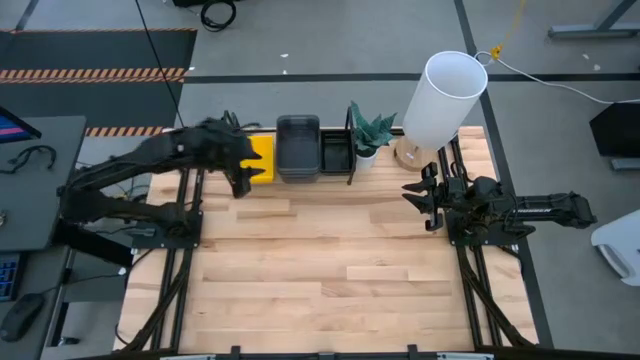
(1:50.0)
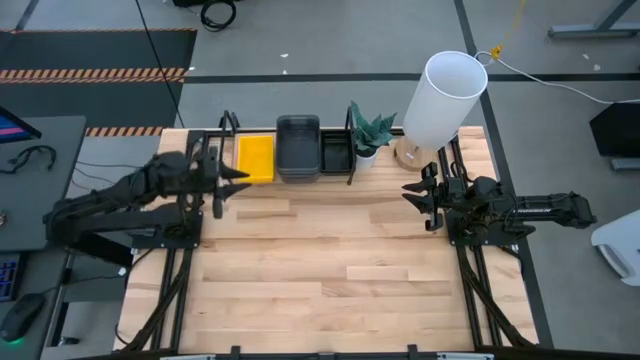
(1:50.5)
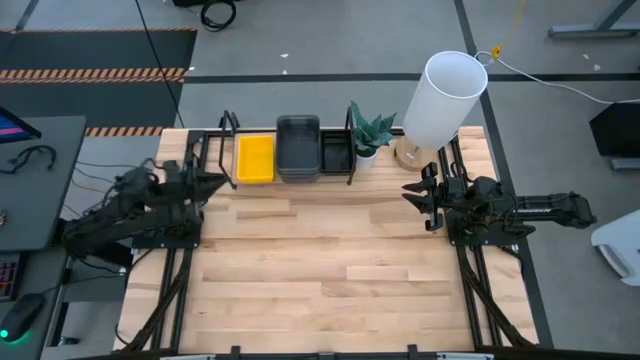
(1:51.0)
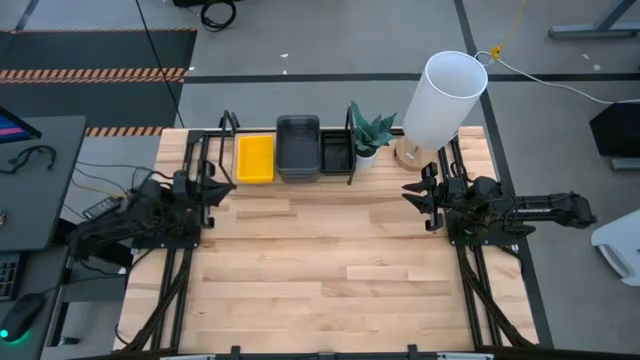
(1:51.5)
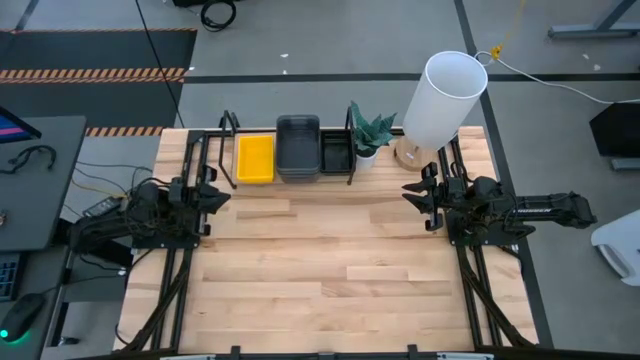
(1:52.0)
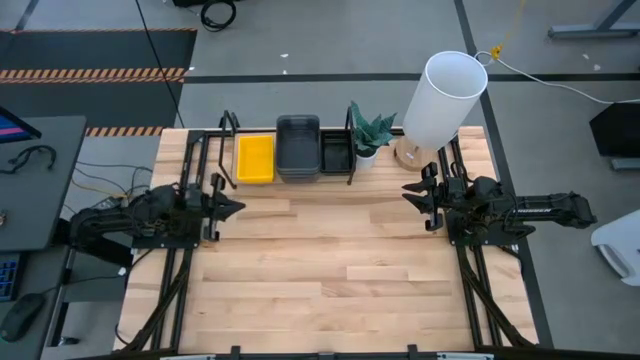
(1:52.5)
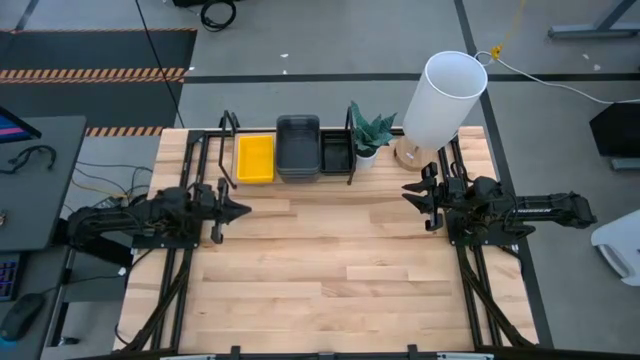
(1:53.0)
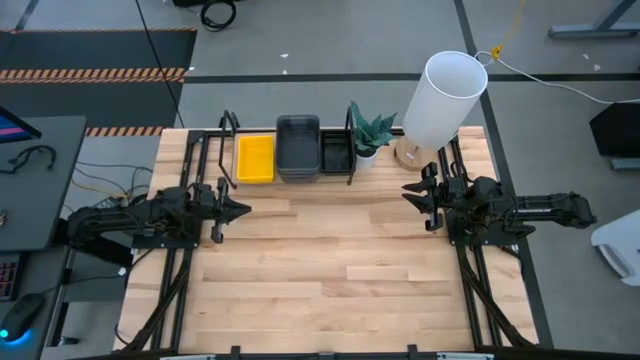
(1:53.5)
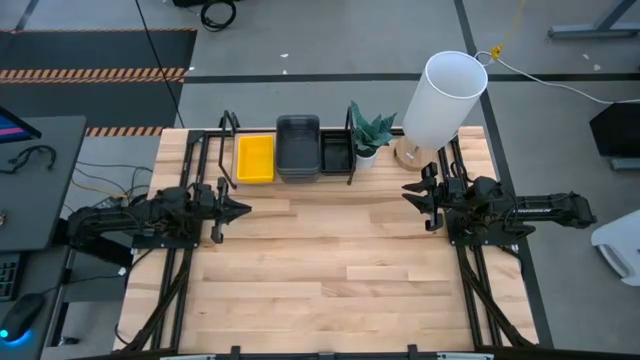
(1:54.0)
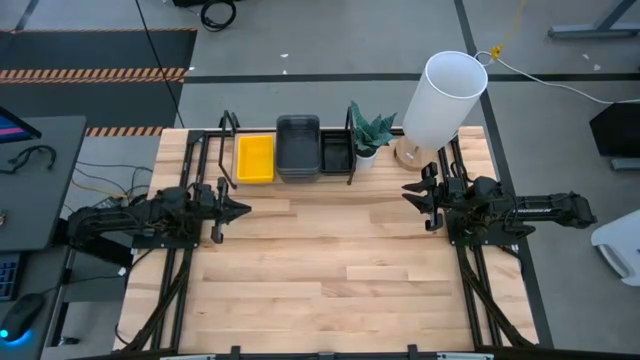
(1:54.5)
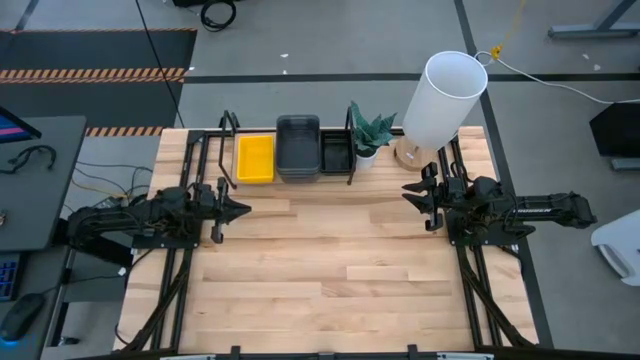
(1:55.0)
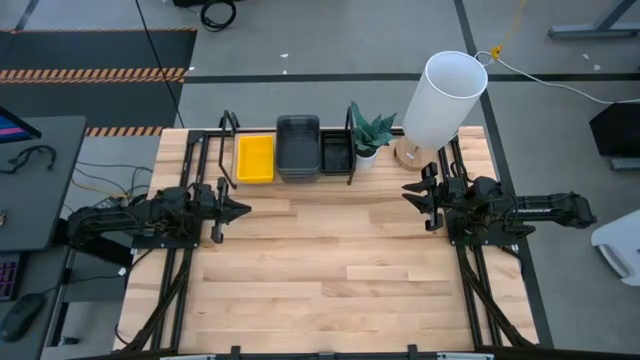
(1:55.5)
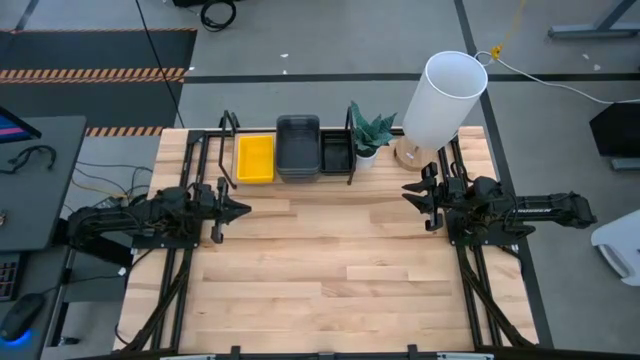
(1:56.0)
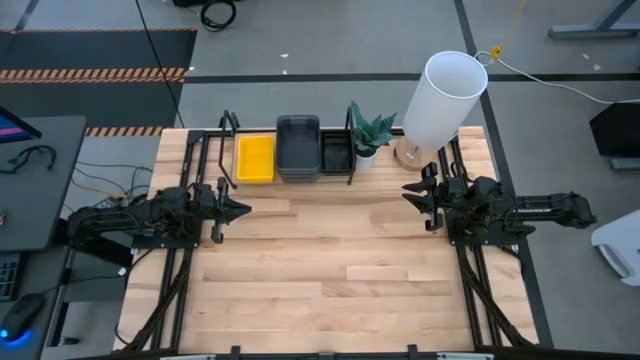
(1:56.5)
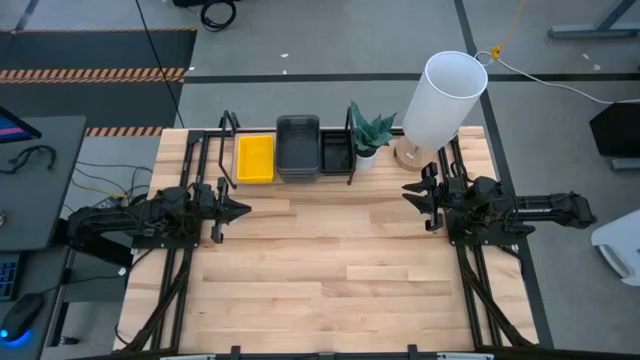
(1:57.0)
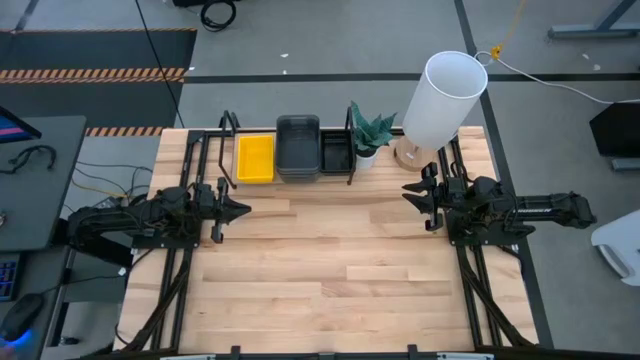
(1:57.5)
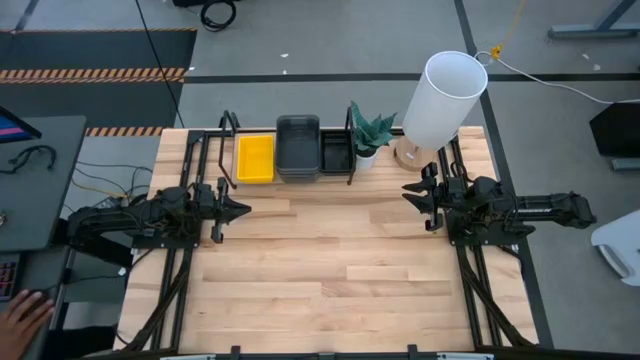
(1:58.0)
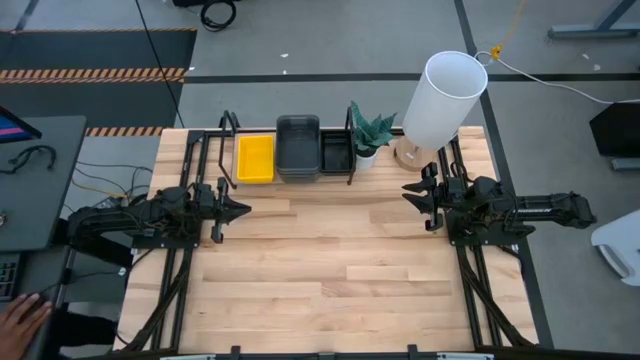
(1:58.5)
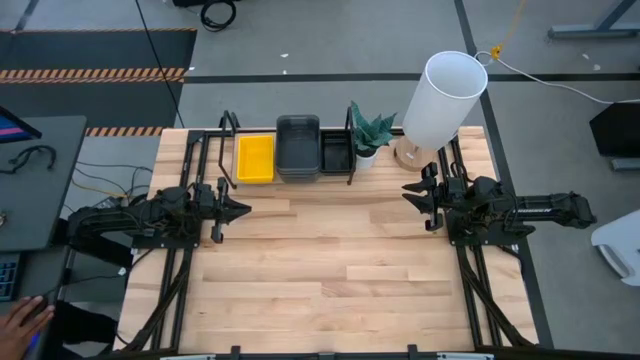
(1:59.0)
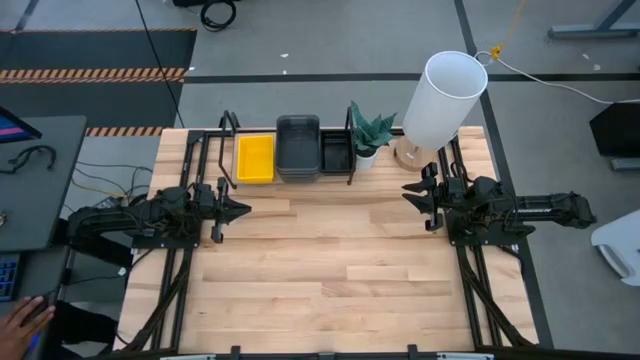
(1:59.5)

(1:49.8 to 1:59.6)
Task: Stack baskets on shelf by color
Return to Home Position

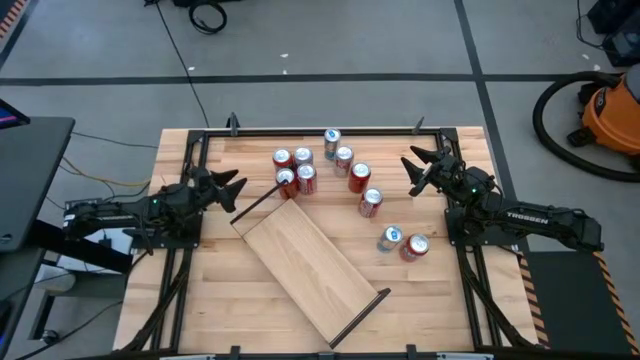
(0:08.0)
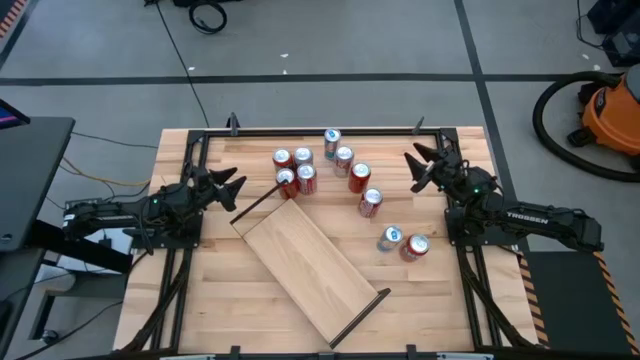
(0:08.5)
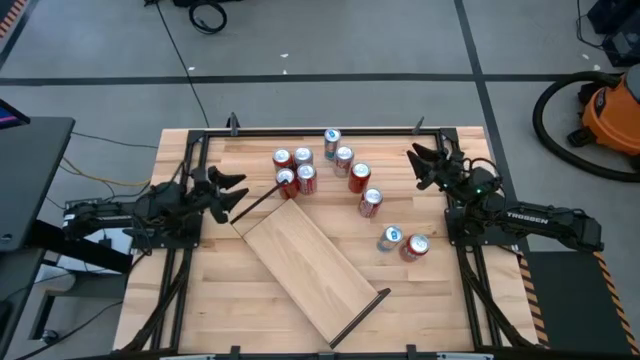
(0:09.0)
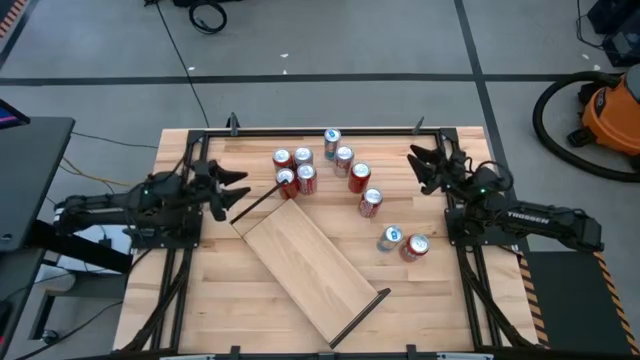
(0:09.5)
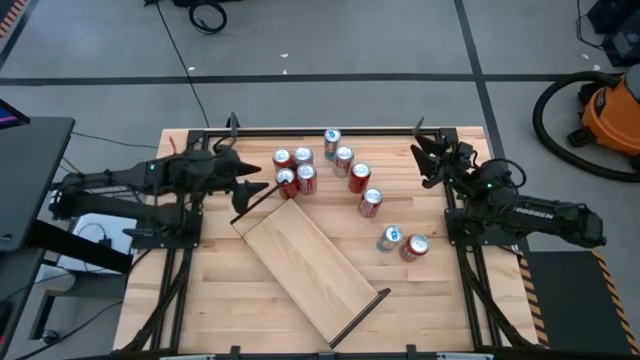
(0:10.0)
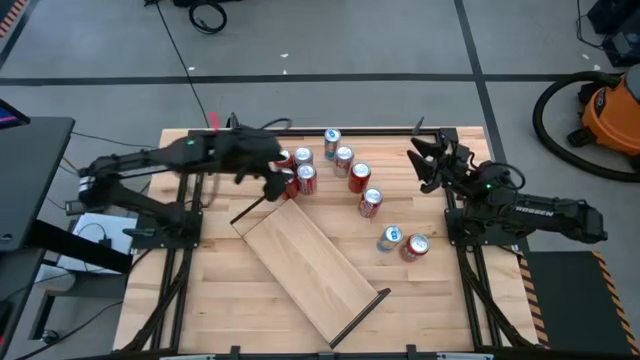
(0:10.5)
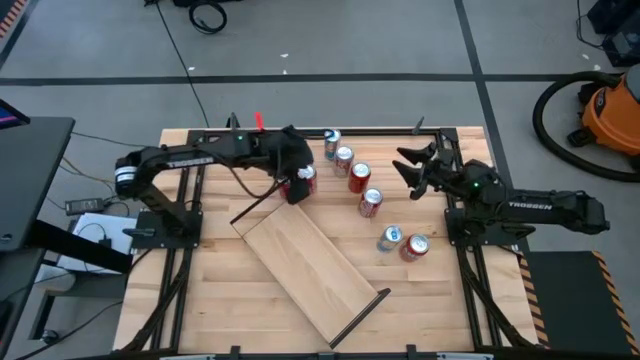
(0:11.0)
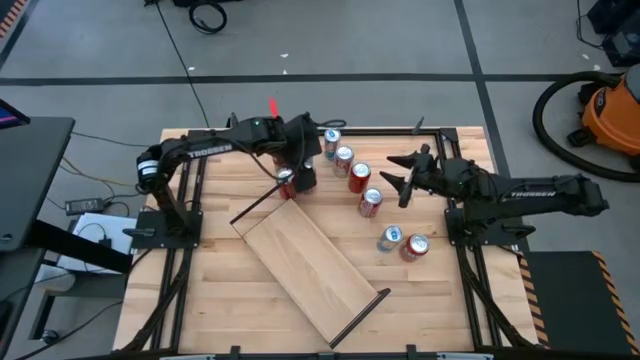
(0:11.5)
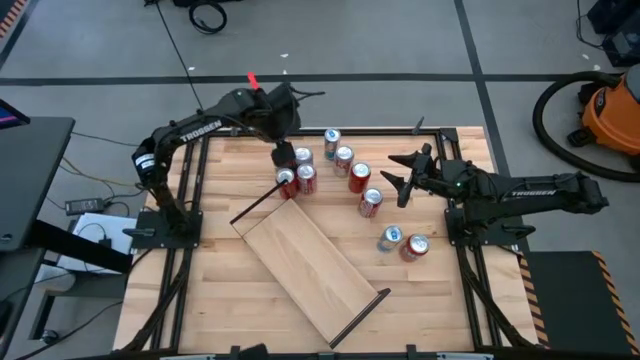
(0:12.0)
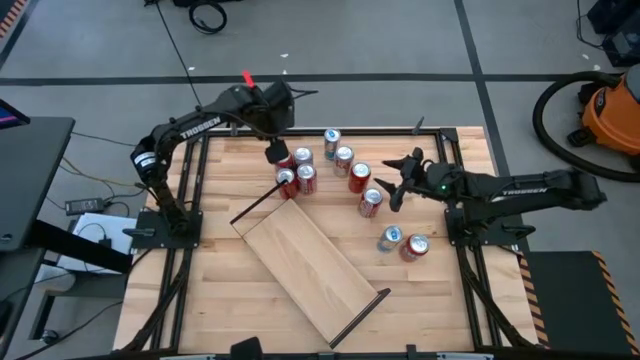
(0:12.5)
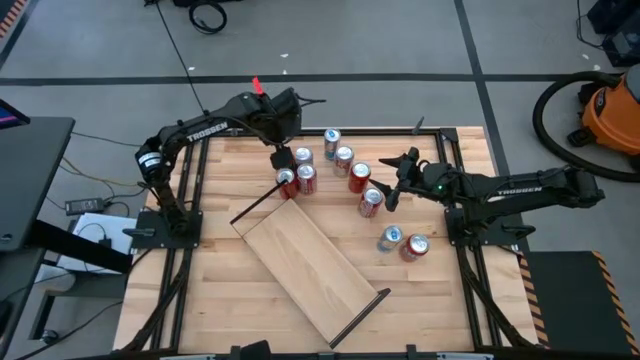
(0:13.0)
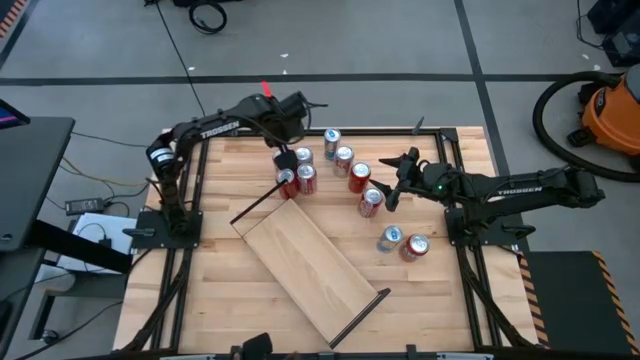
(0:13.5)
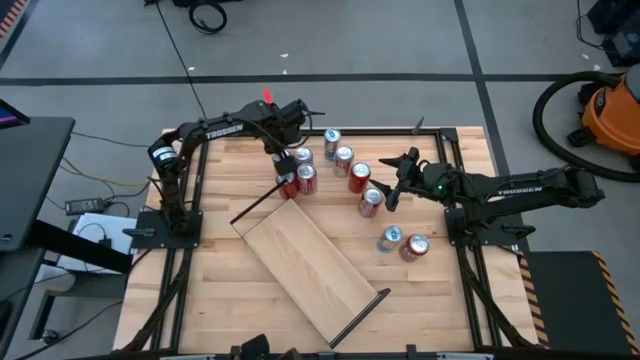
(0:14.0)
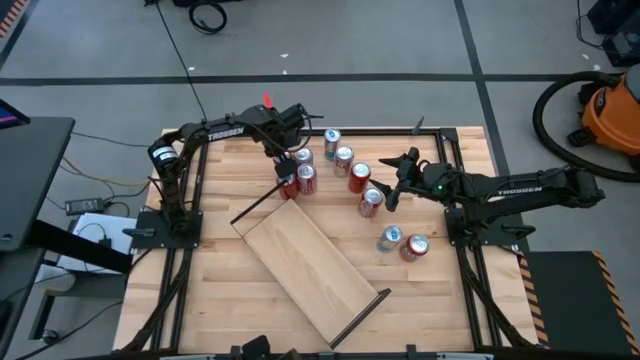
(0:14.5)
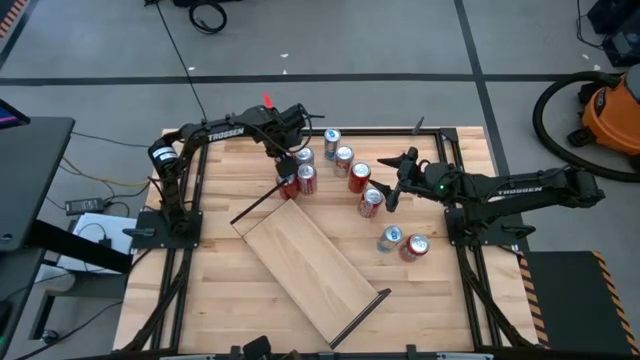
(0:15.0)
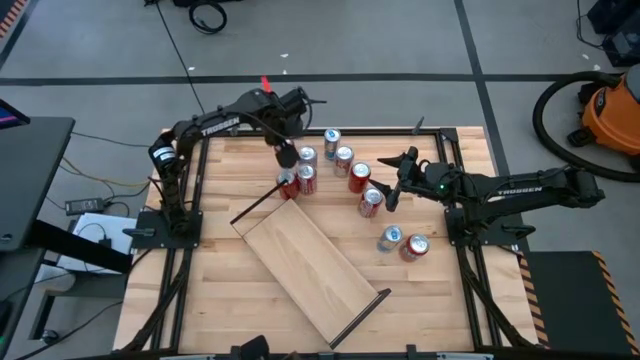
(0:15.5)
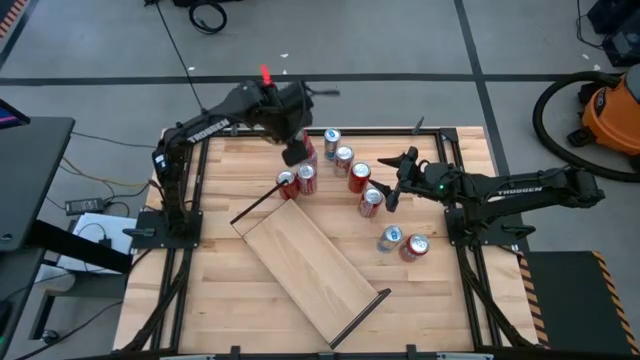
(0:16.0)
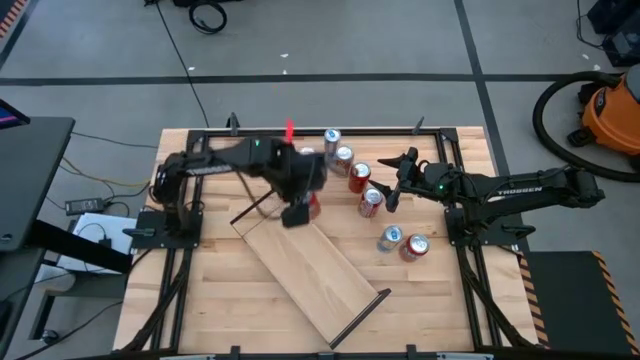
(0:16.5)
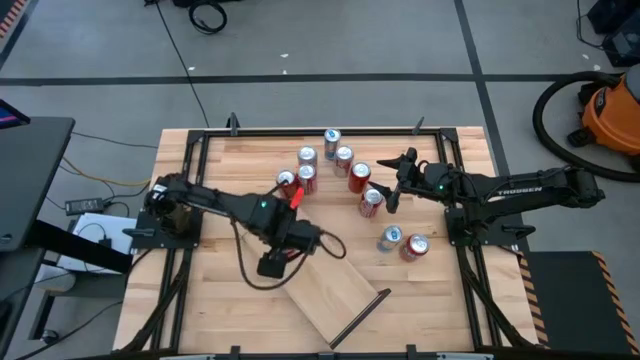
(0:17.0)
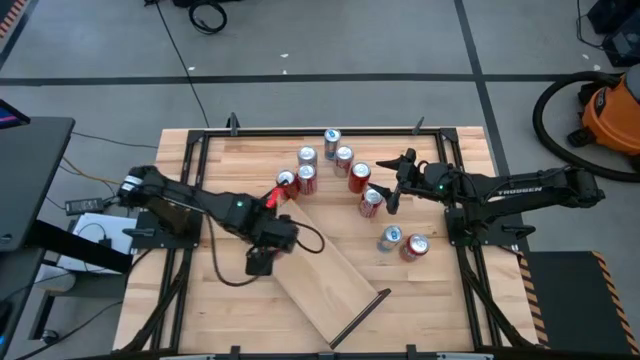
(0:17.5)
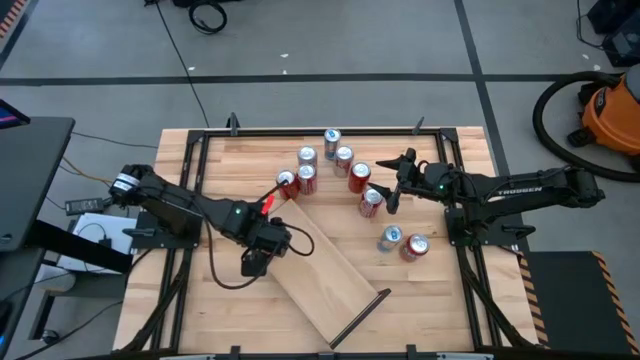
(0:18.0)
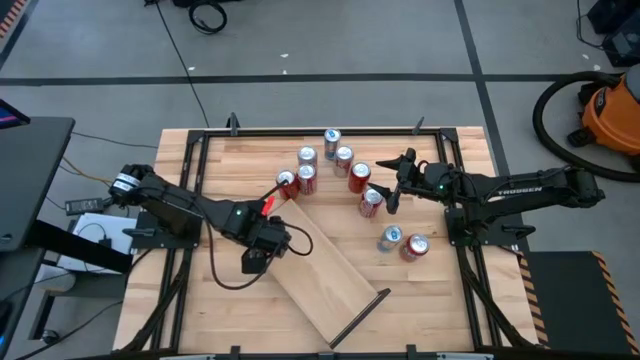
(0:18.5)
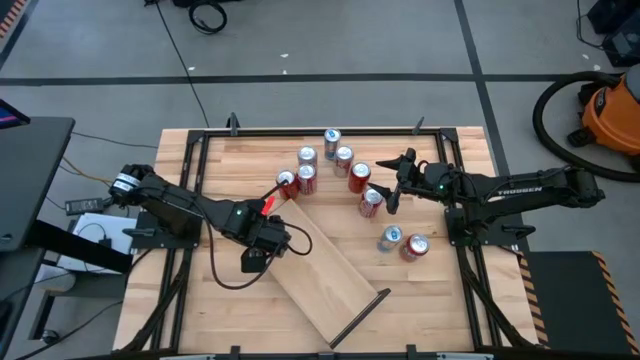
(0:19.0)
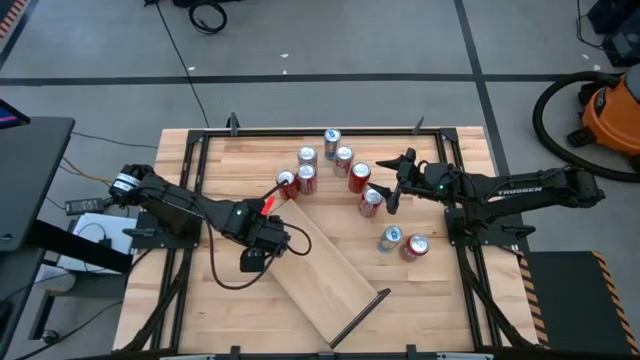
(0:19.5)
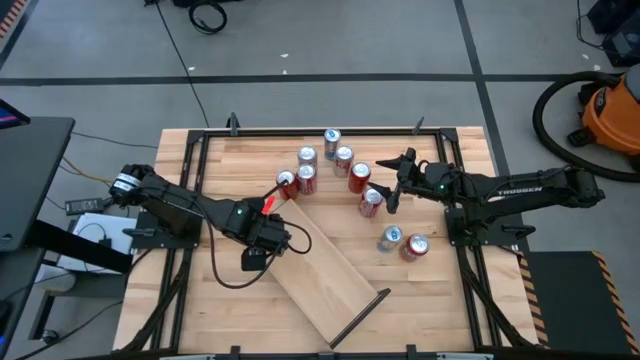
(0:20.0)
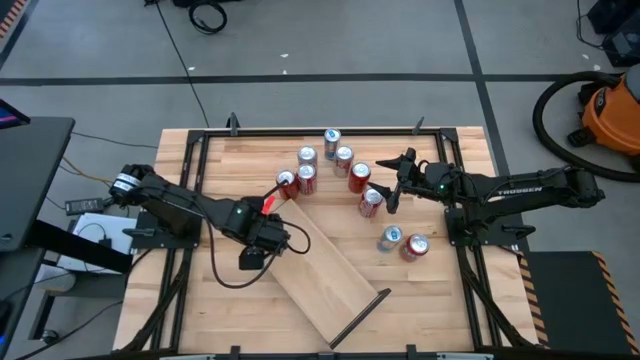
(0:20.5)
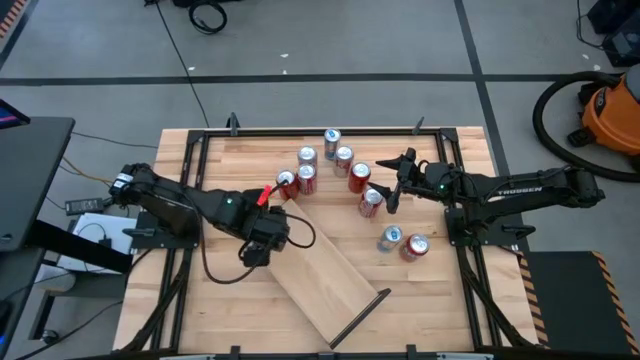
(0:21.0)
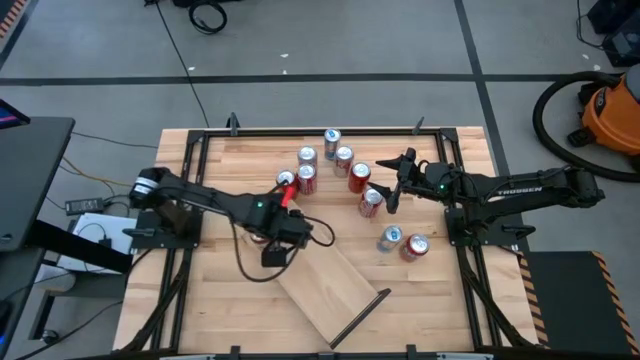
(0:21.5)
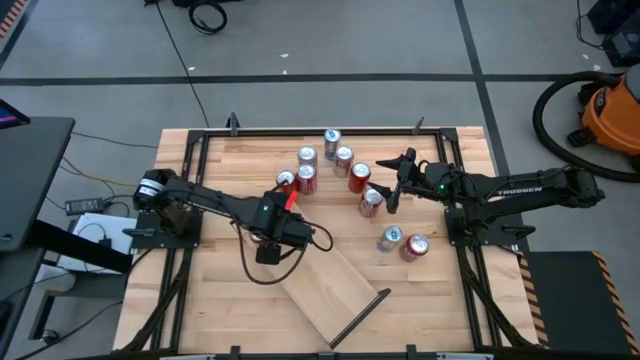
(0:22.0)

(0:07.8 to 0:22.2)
Task: Place canned beverage on shelf
Put the top orange soda can on the shelf
